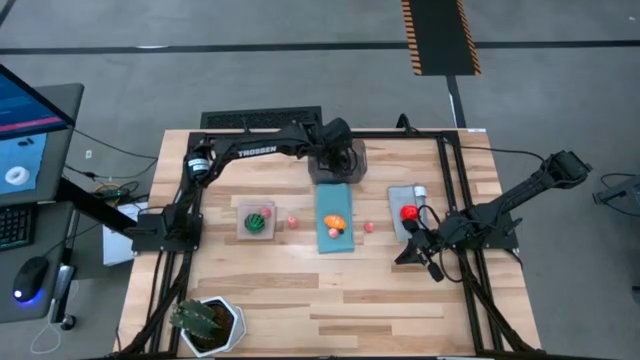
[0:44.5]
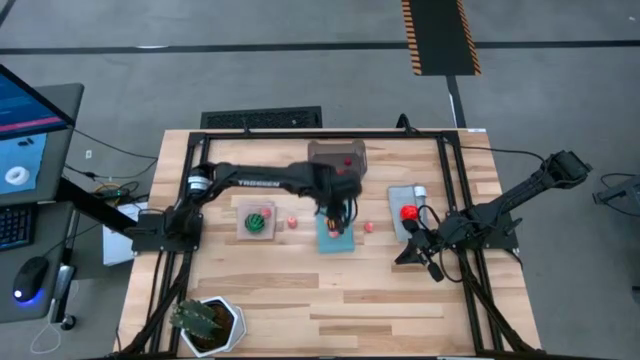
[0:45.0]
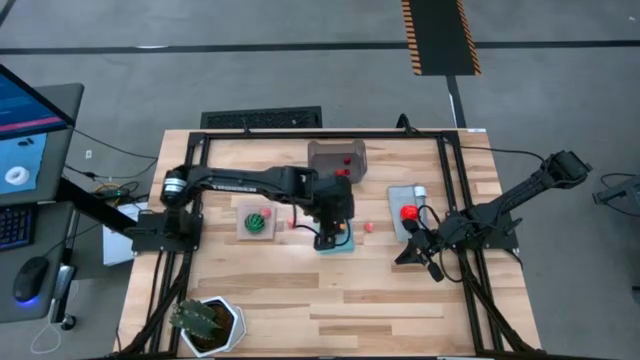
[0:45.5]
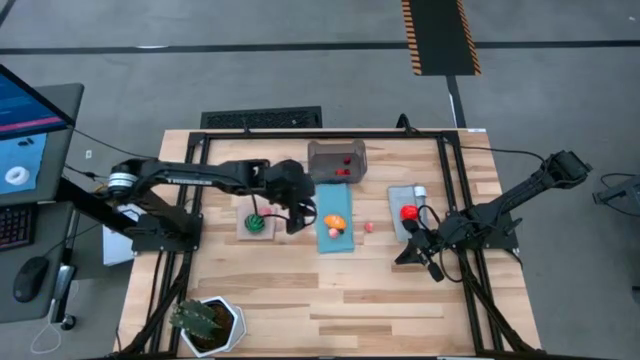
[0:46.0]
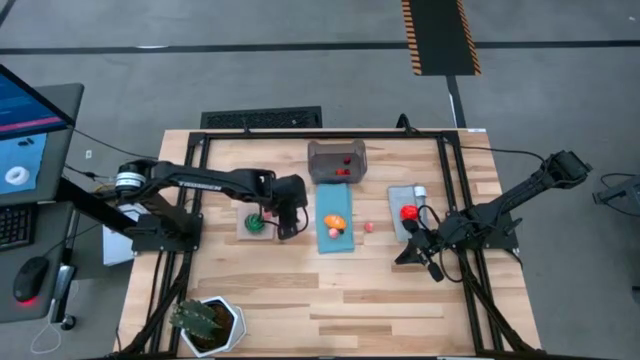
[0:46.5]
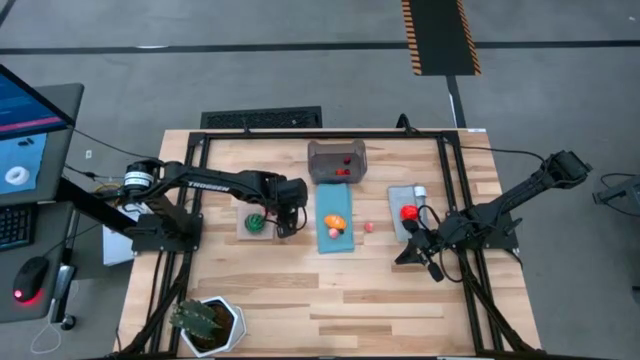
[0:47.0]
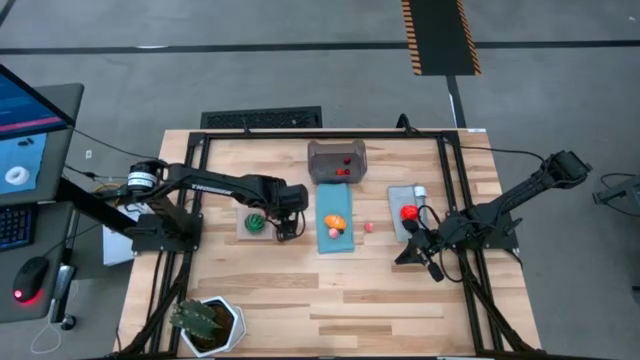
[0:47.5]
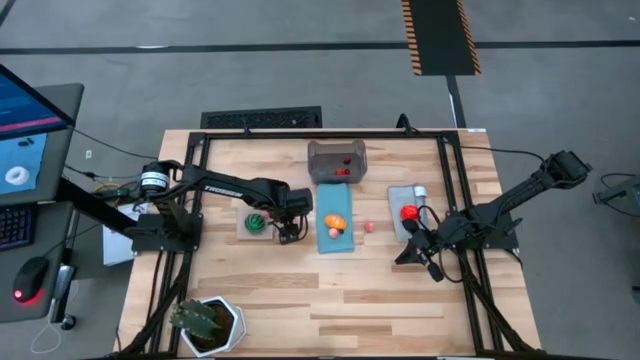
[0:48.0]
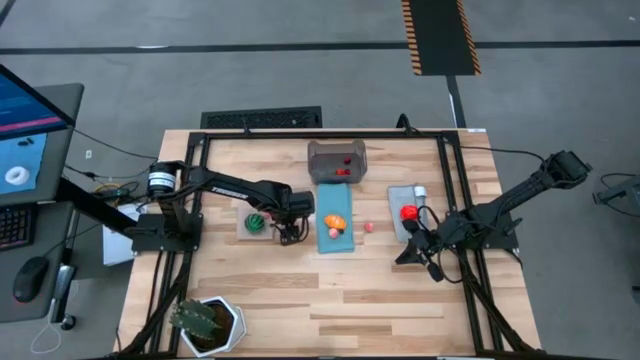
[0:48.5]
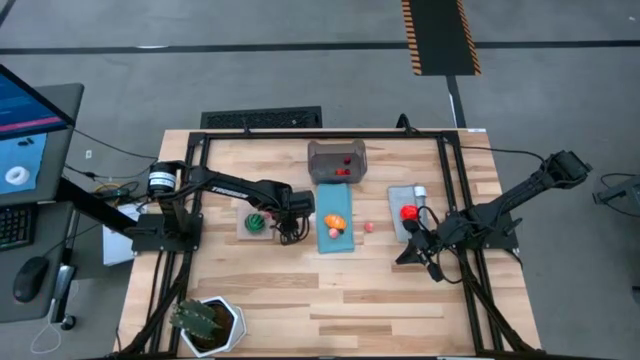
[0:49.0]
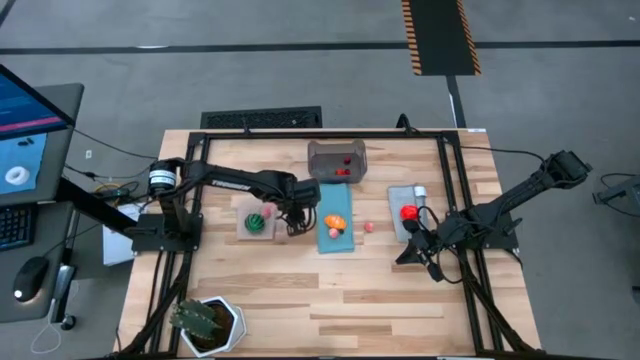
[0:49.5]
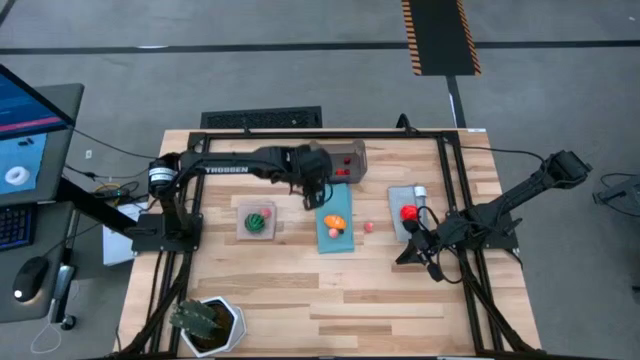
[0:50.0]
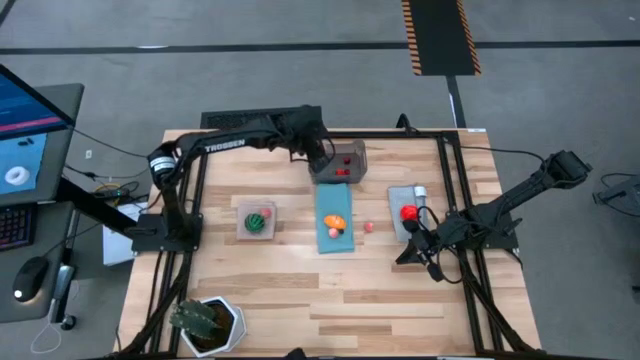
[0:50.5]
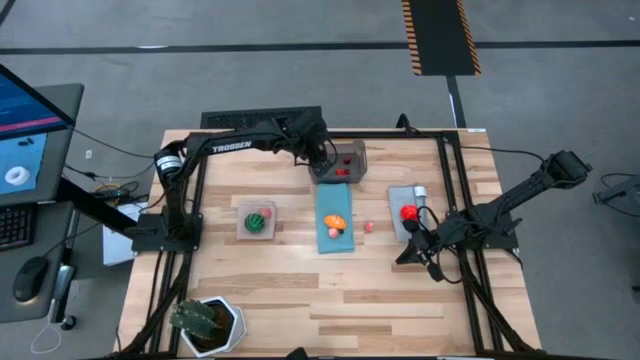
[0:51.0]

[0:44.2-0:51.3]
Task: Pick and placing Produce into tupperware
Put the pink peach into the gray bin

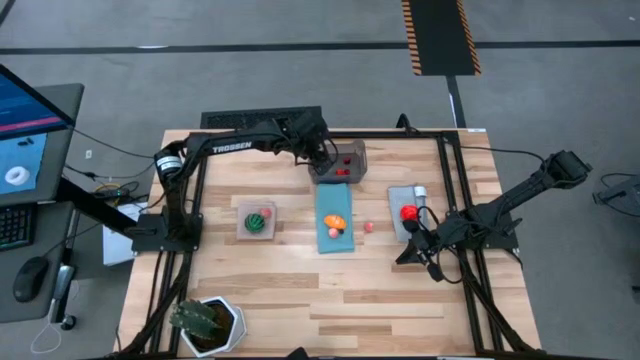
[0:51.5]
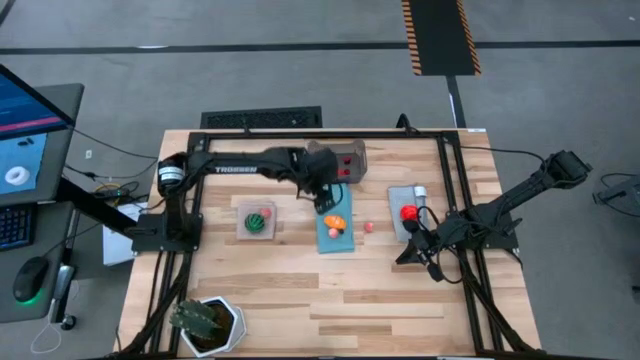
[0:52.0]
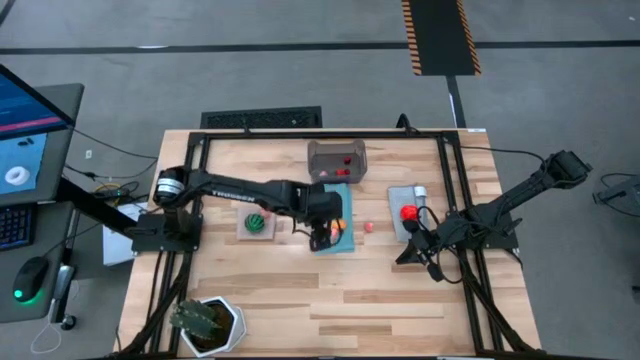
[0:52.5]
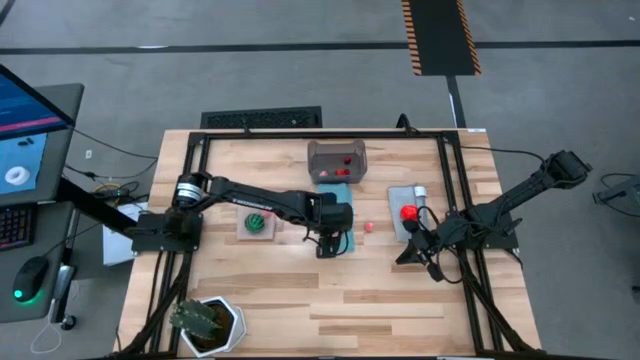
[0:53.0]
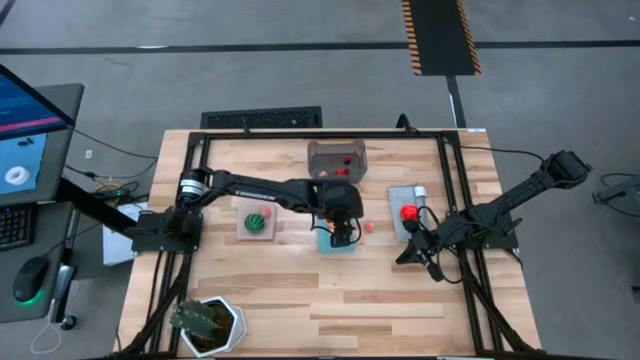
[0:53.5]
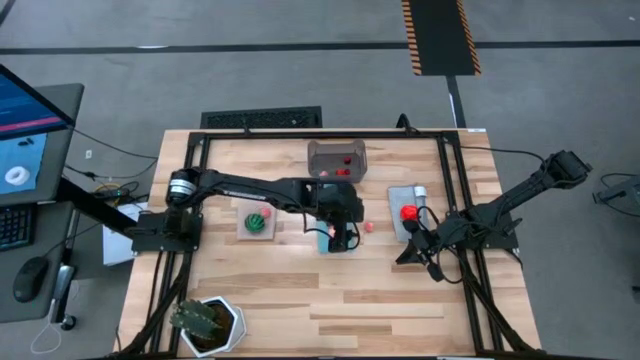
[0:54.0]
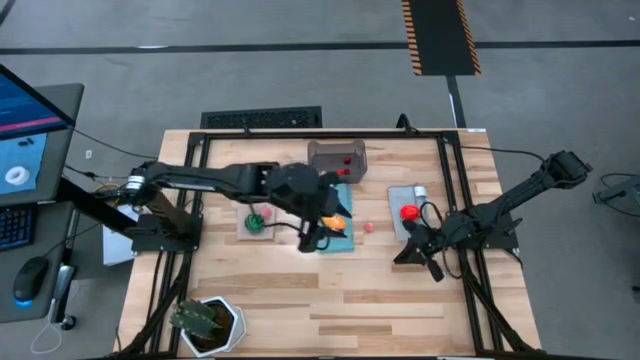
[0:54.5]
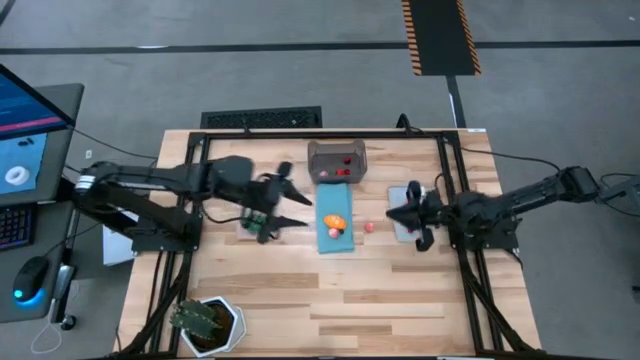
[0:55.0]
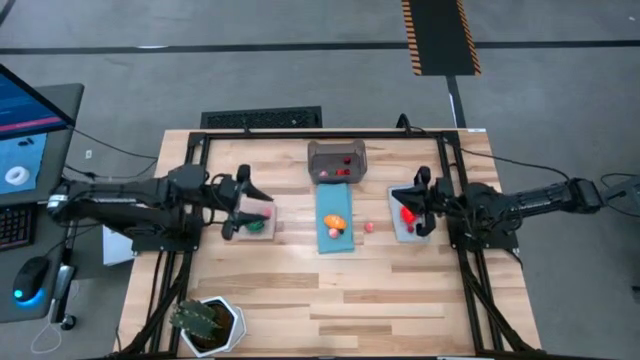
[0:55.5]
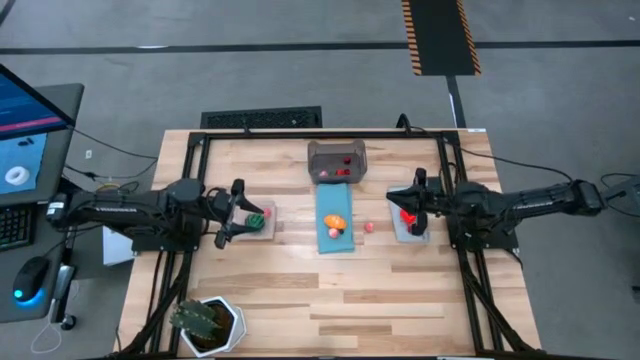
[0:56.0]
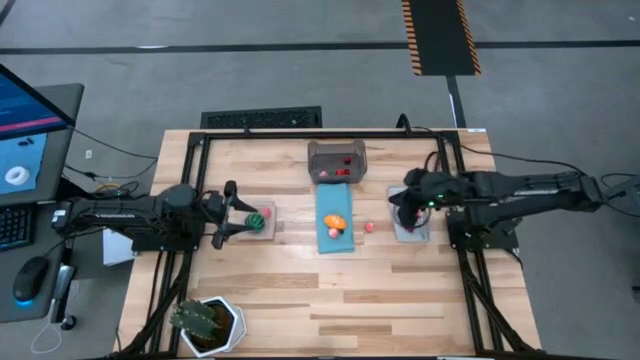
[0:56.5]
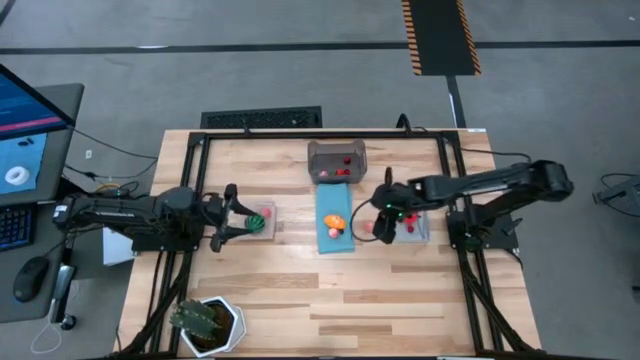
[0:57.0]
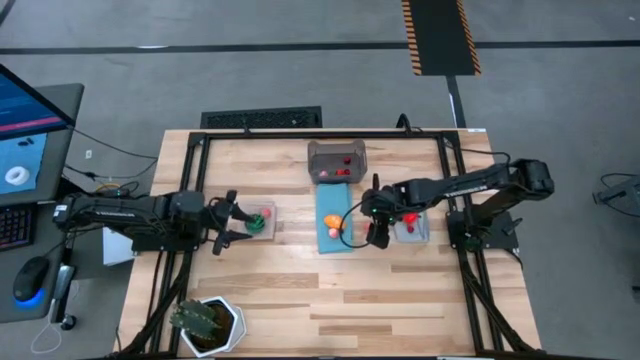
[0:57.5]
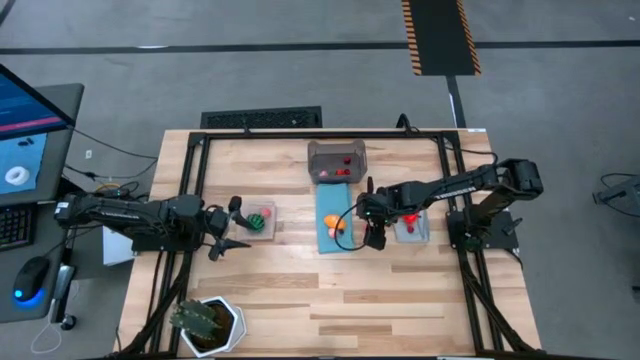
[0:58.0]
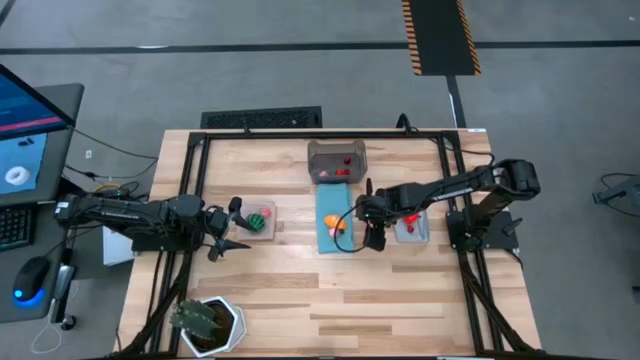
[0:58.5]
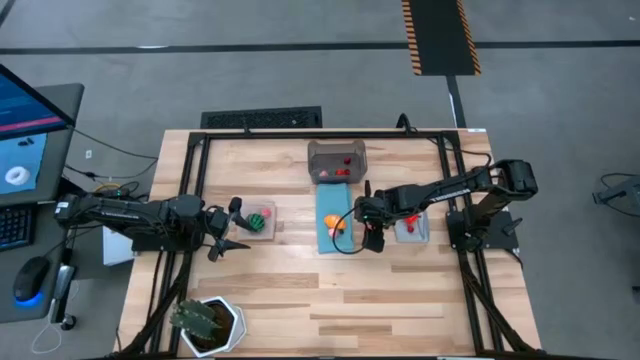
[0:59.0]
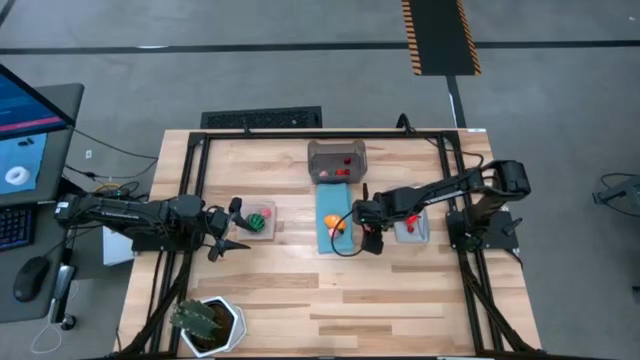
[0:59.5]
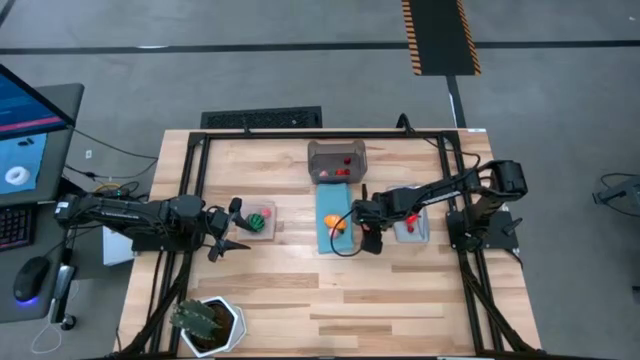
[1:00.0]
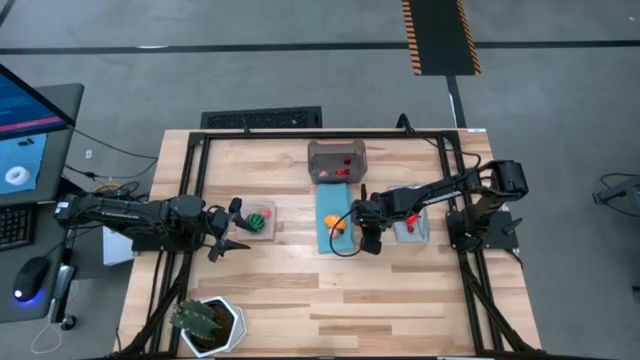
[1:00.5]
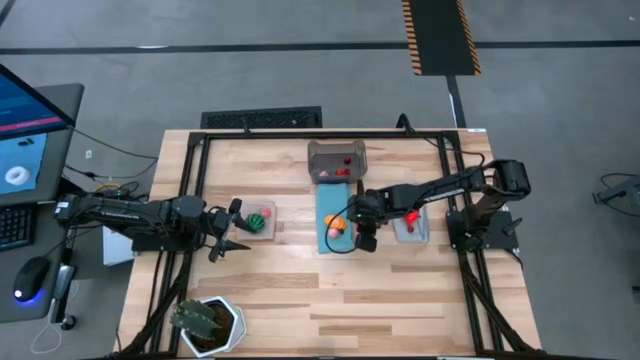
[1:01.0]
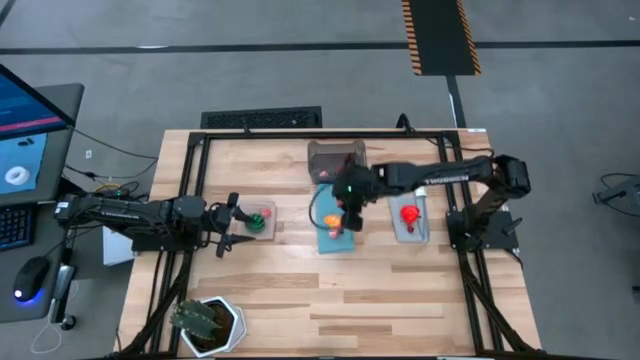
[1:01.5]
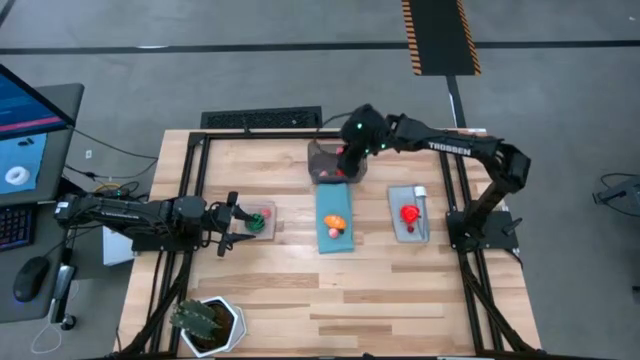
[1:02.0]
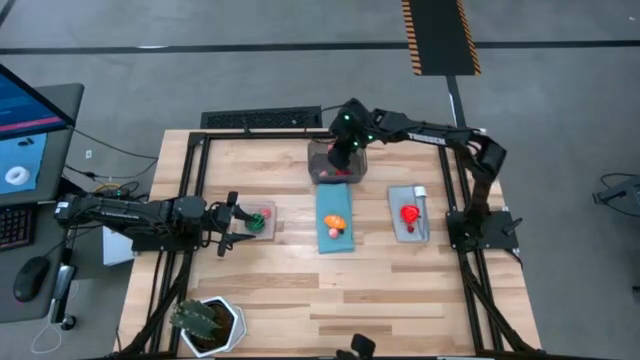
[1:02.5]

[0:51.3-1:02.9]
Put the pink peach into the gray bin

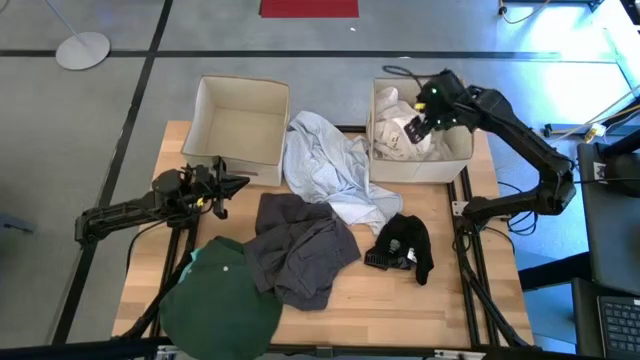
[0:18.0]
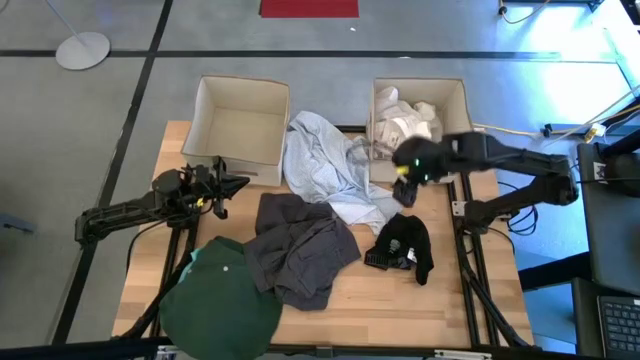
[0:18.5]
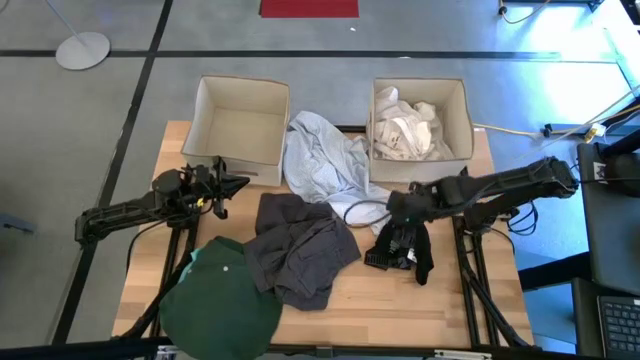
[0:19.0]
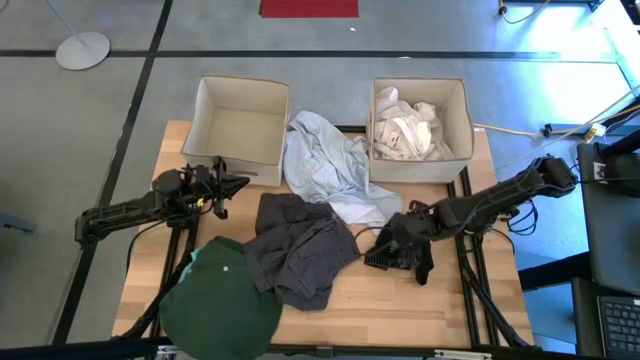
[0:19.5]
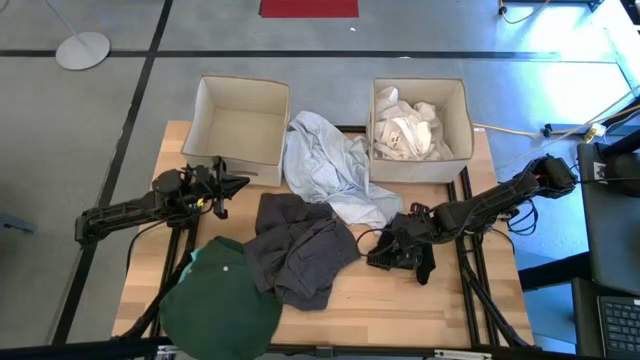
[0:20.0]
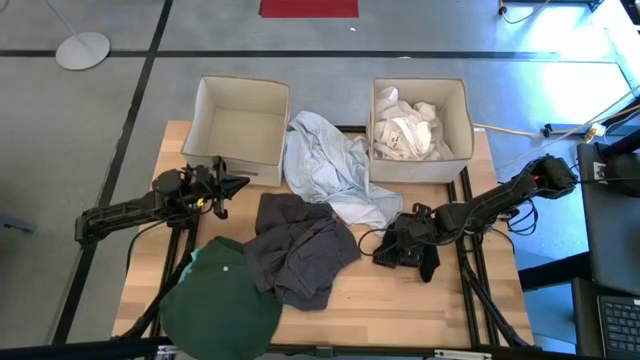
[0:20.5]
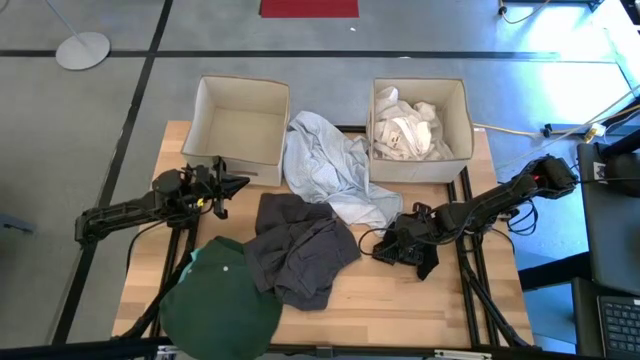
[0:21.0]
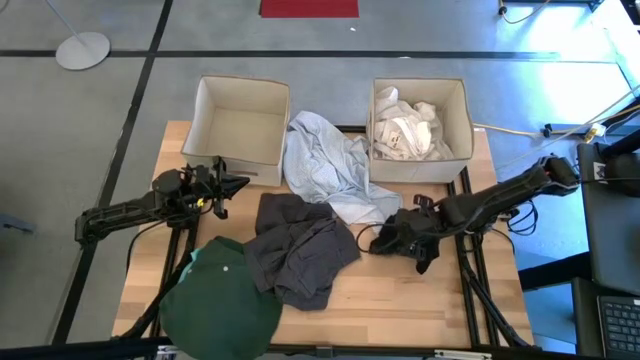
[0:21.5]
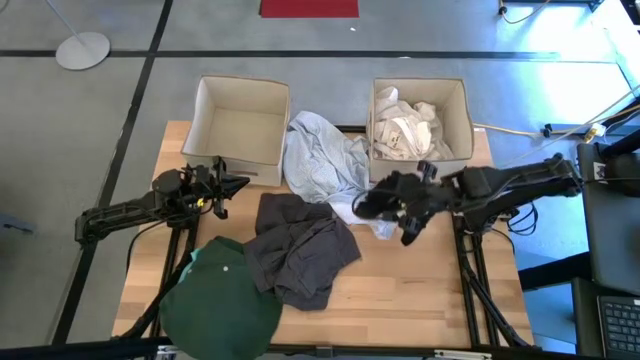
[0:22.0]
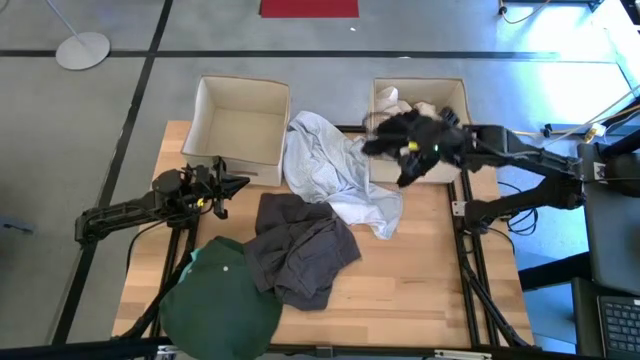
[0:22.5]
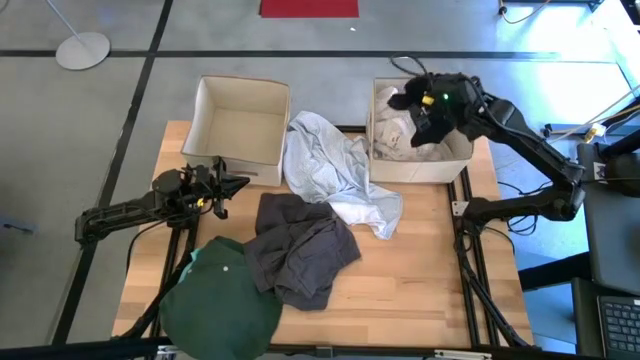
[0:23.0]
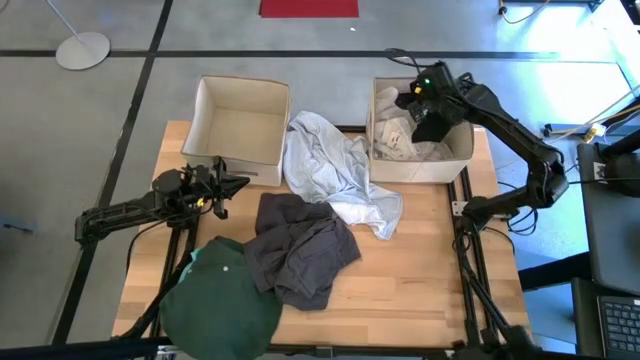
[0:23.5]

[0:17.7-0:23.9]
Task: Sort clothes
Put the black underwear into the right laundry bin
